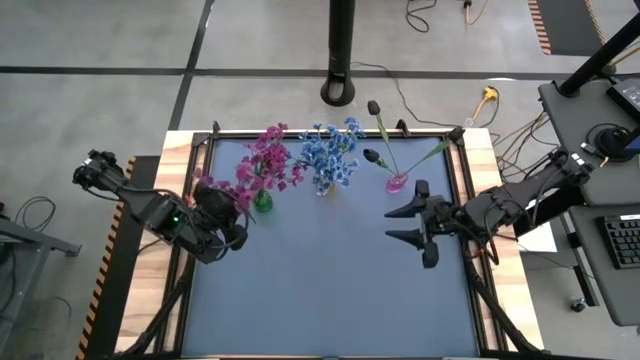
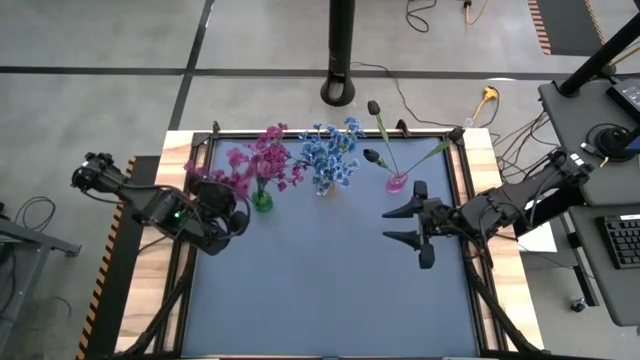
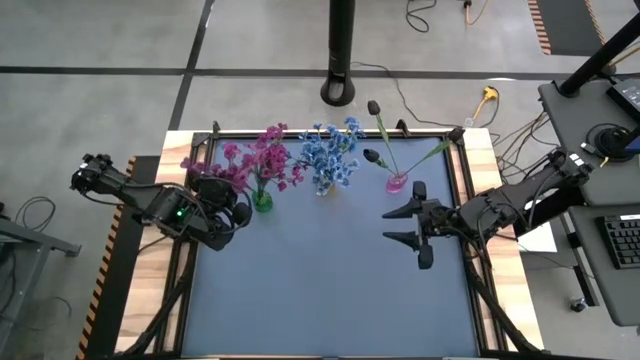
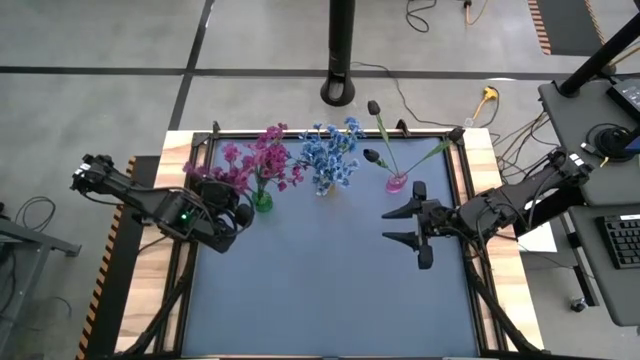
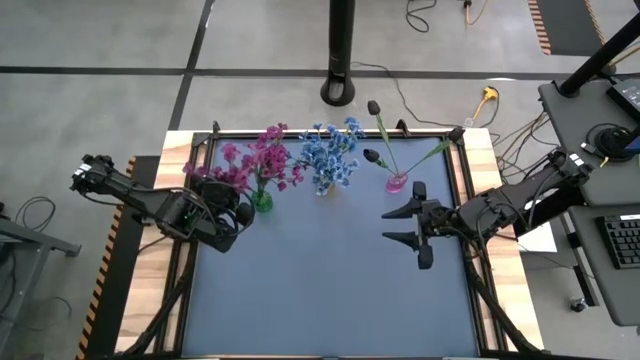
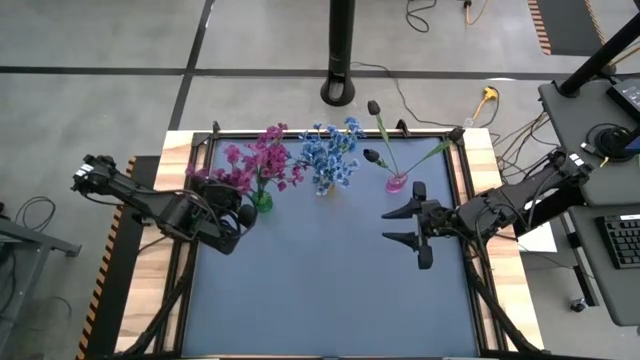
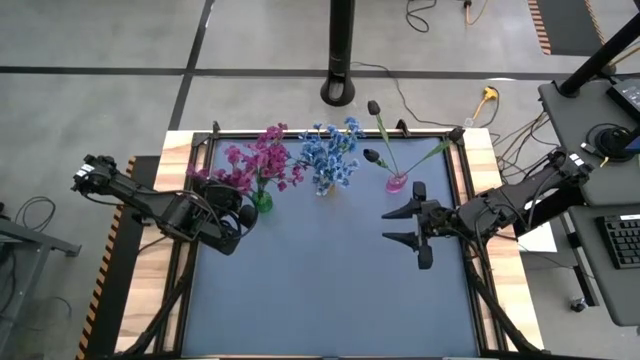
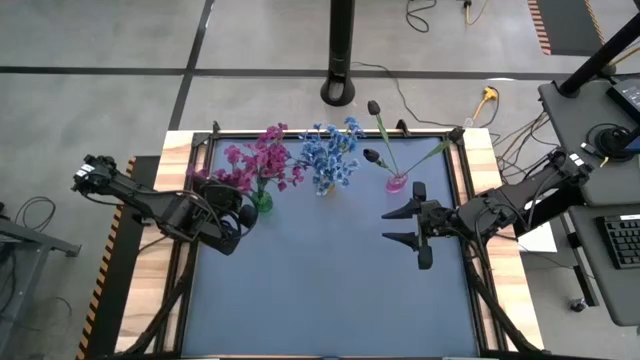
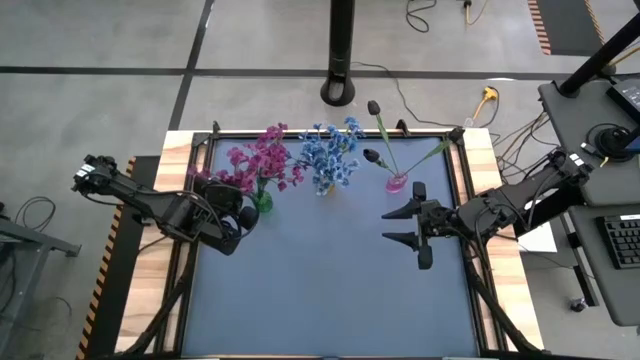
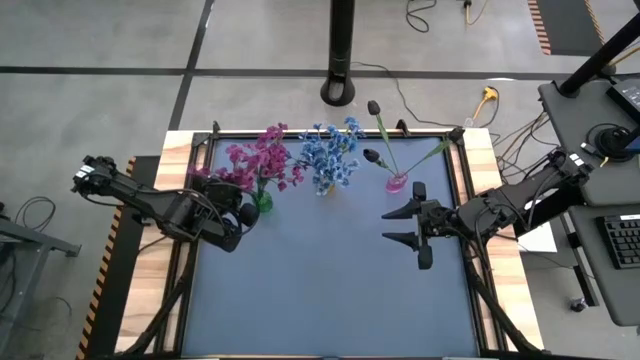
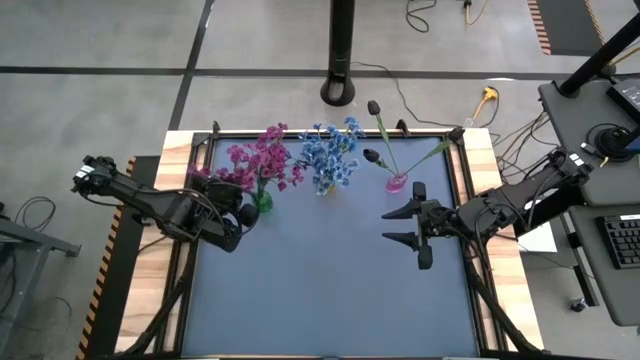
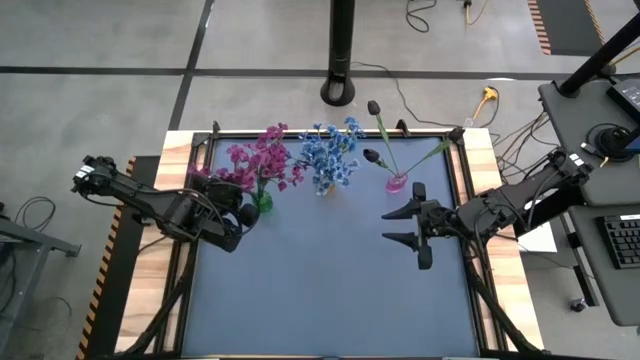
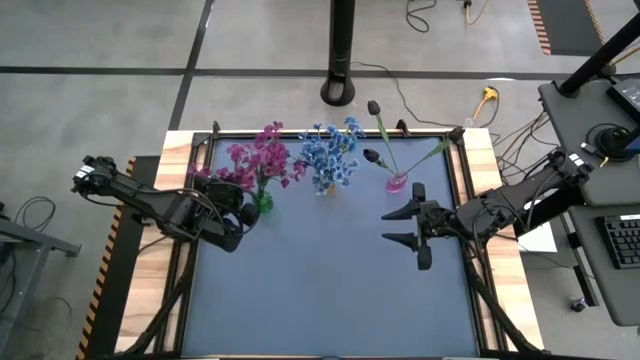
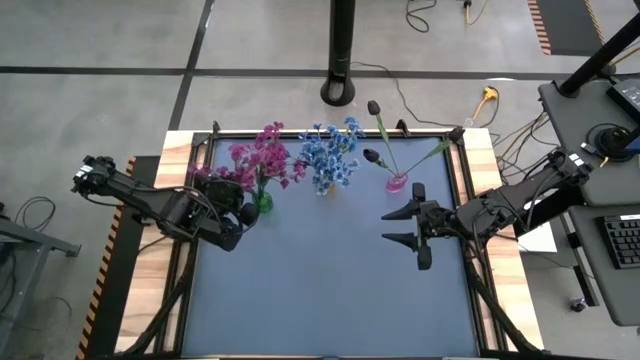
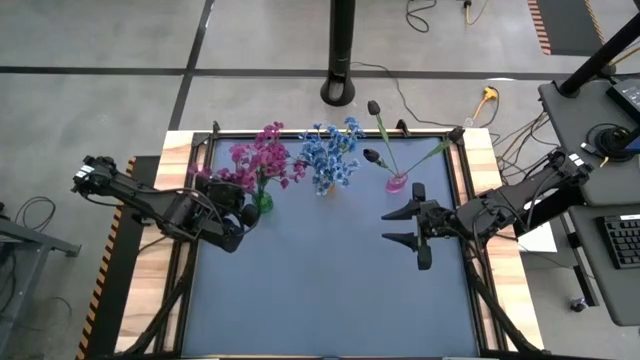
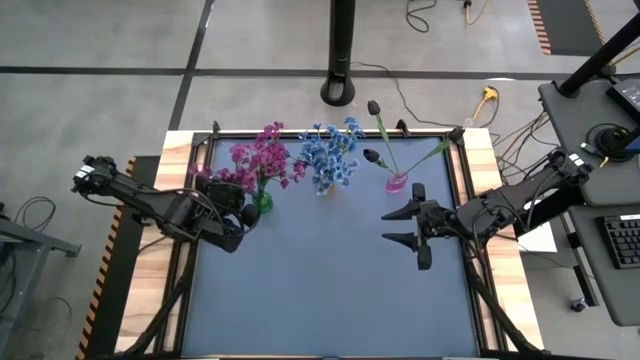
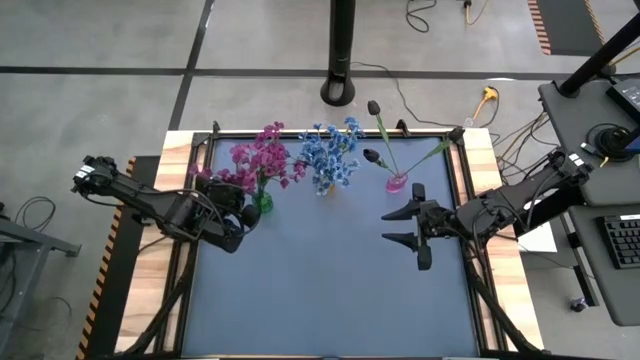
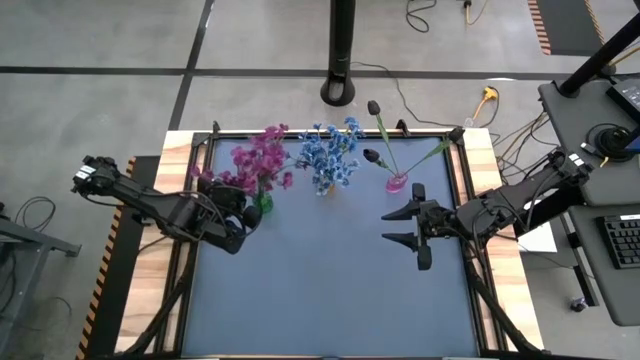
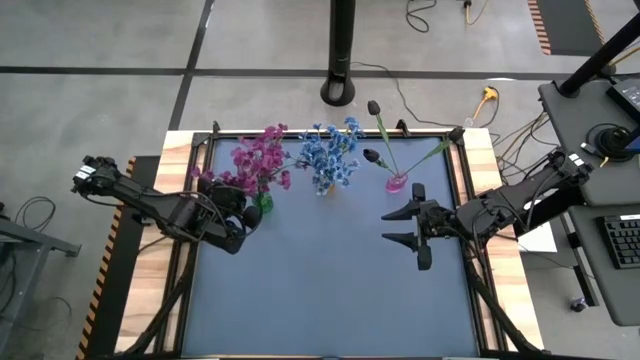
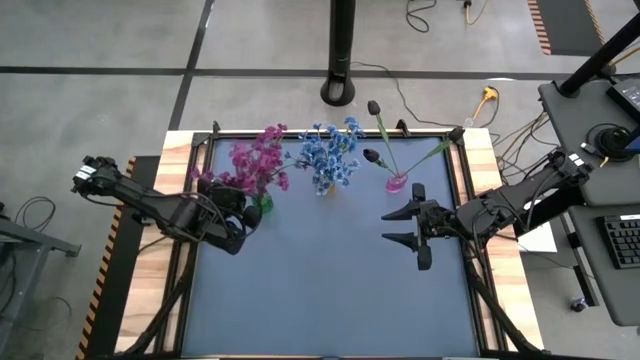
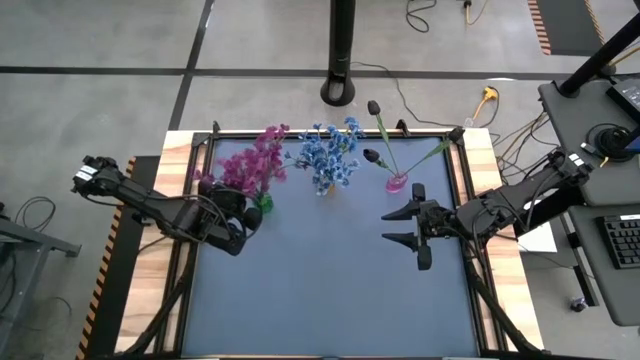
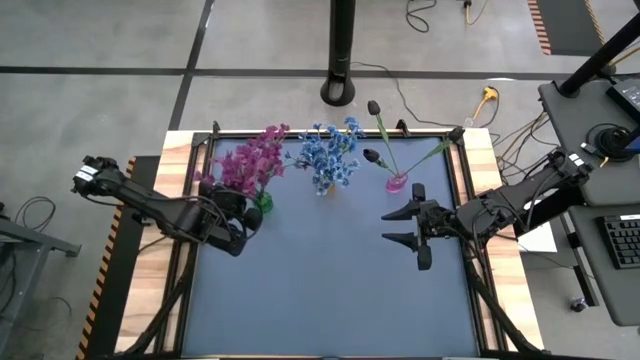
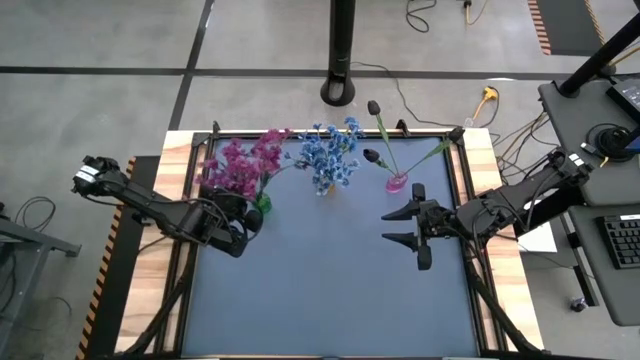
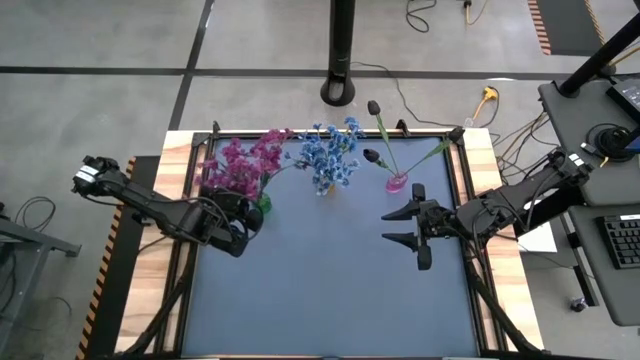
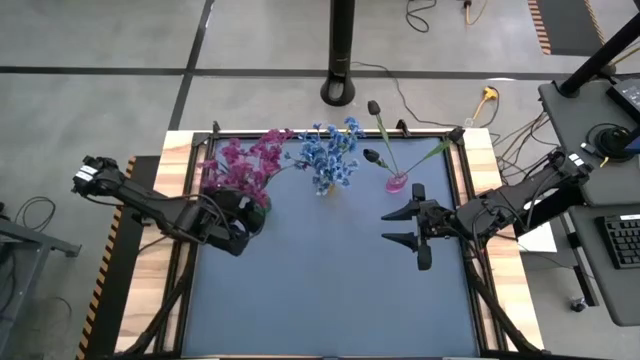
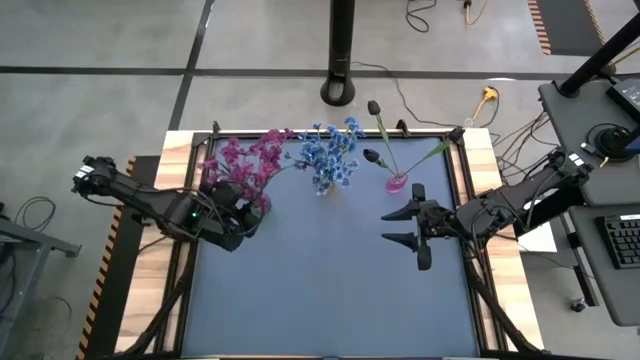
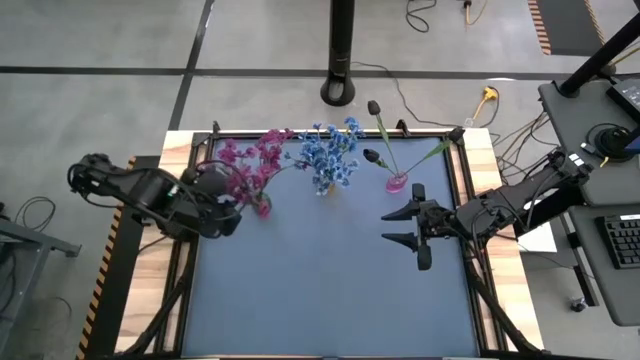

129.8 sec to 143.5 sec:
Task: Sort flowers into vase by color
Put the purple flowers into the green flower vase

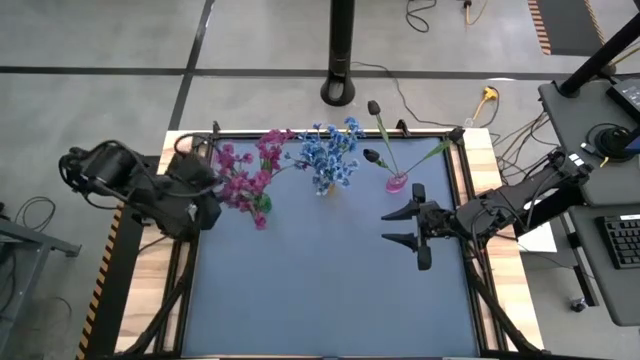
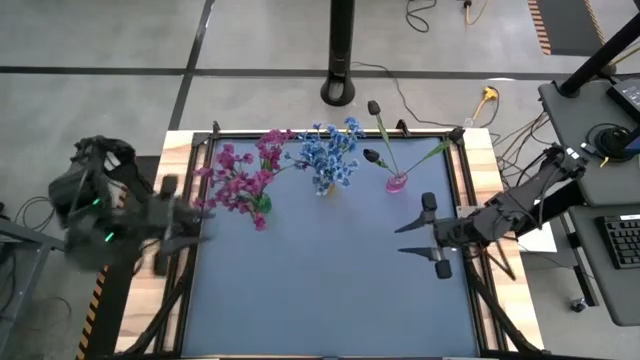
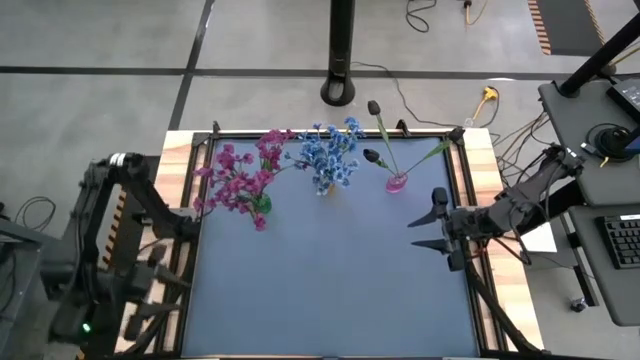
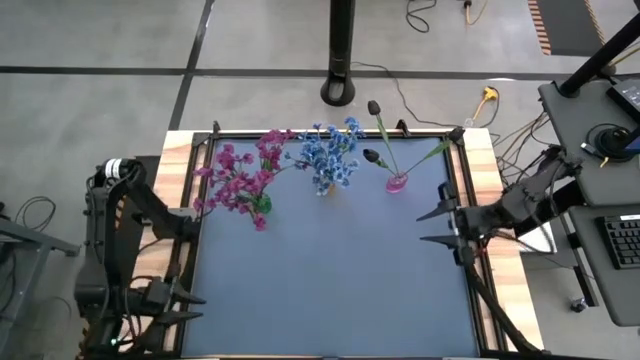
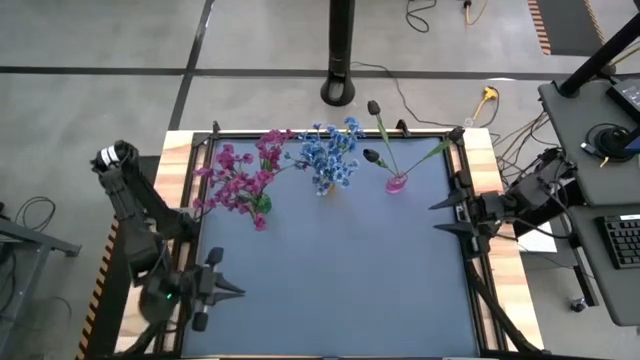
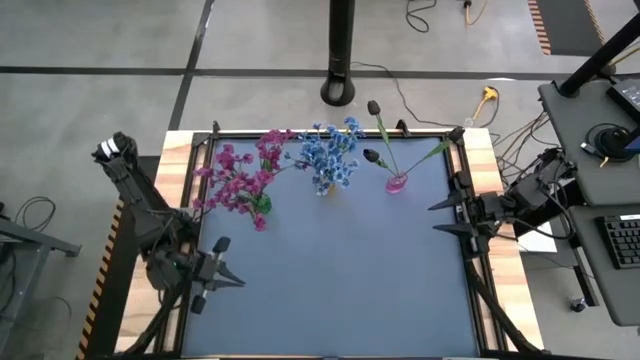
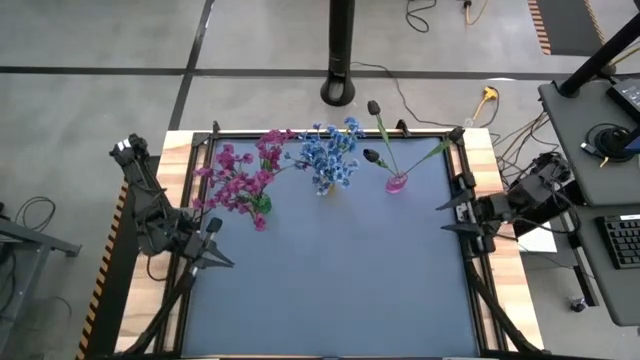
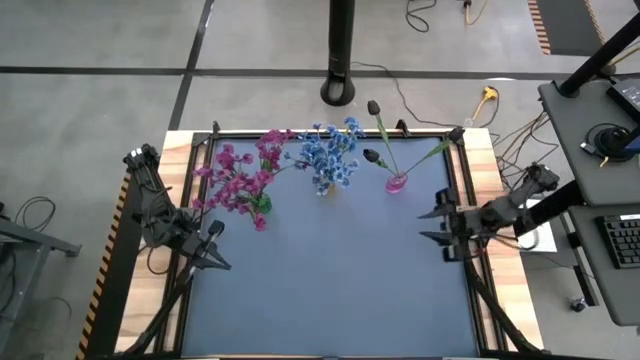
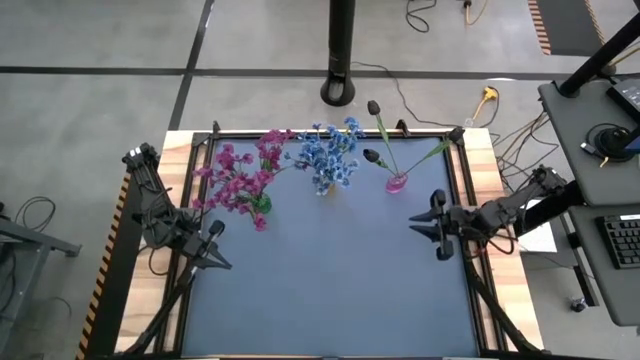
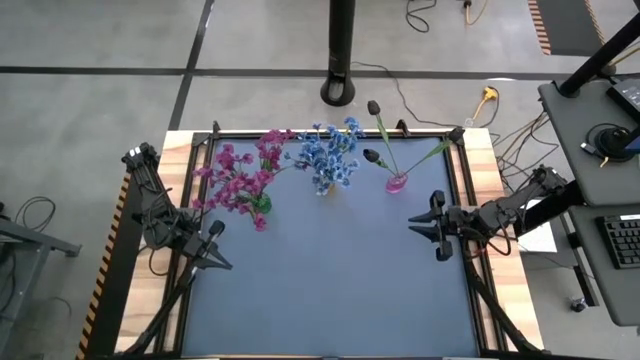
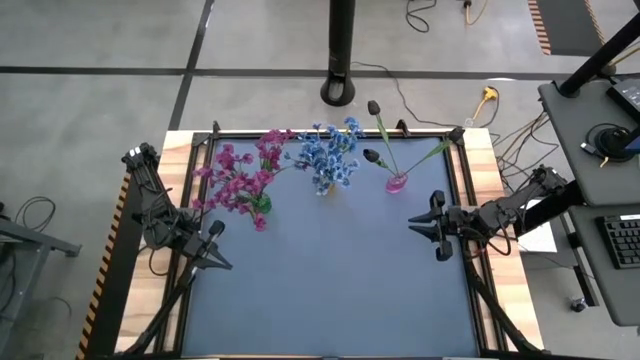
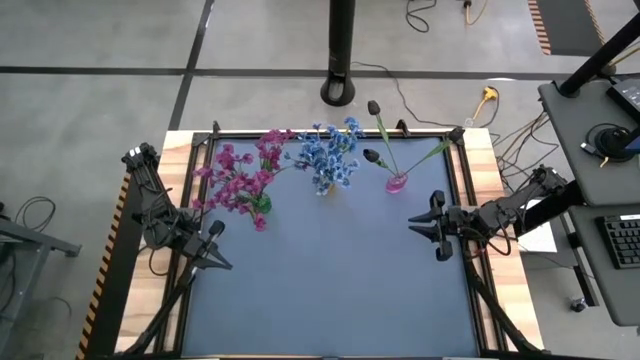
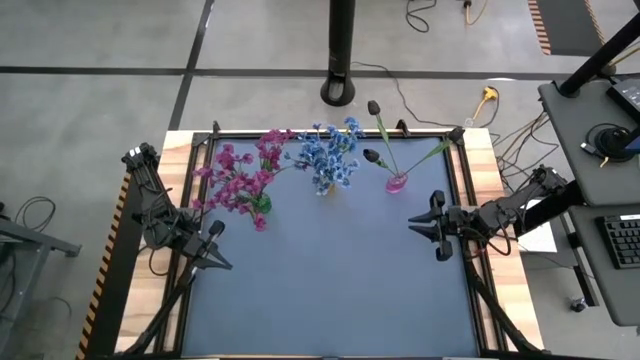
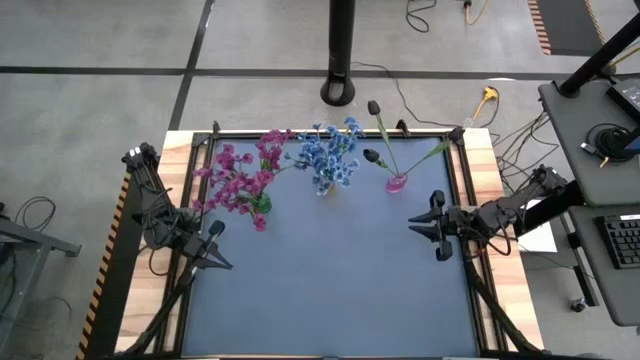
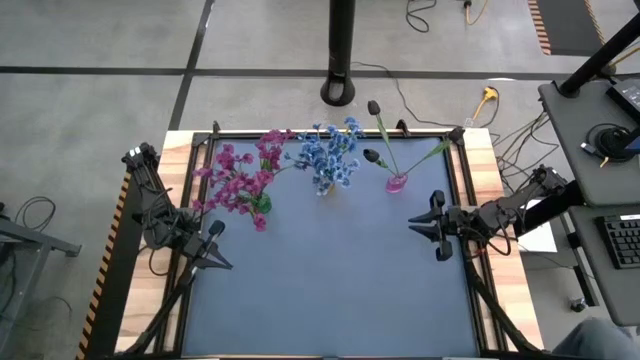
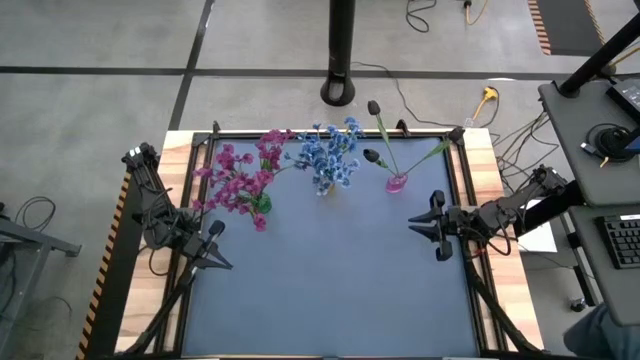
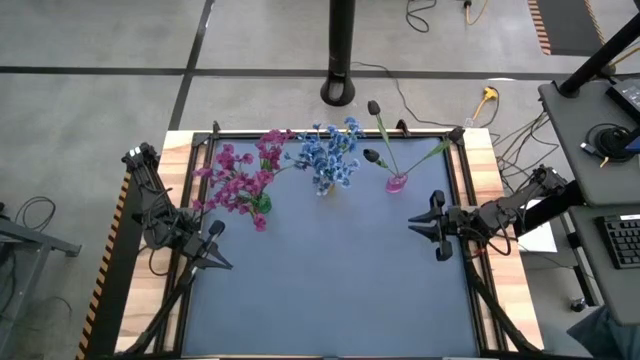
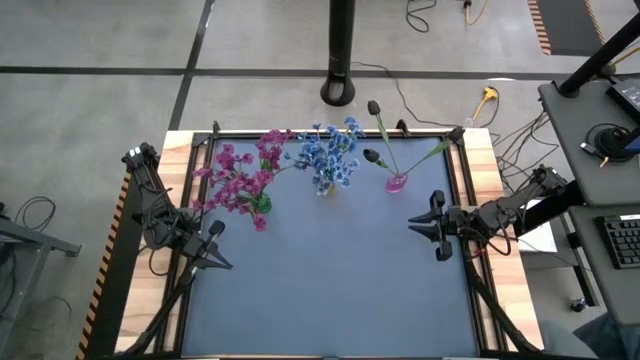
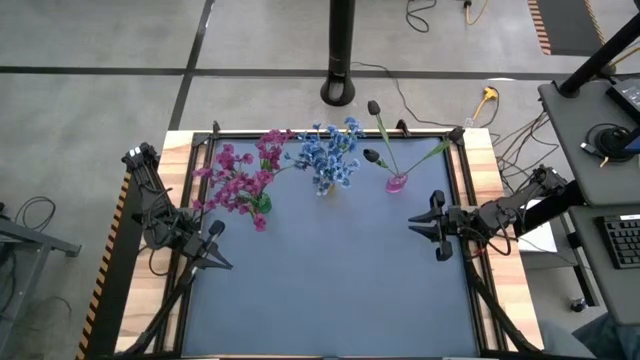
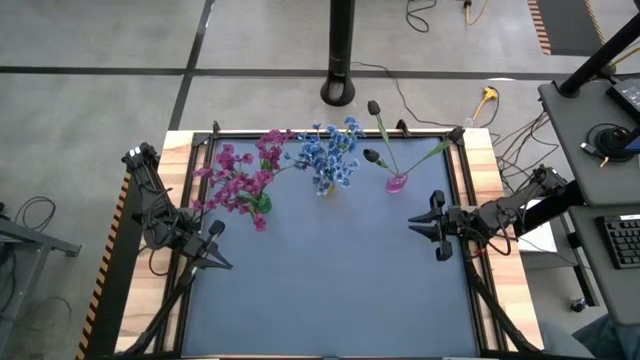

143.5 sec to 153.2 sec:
Return to Home Position
